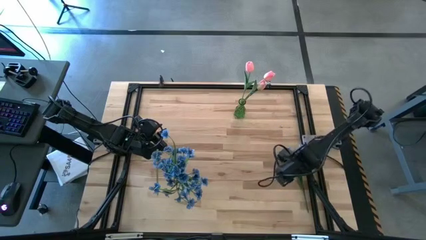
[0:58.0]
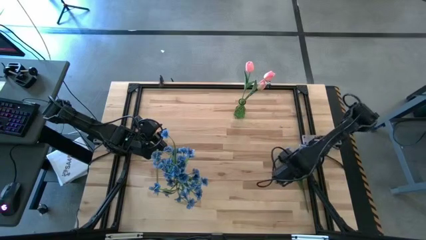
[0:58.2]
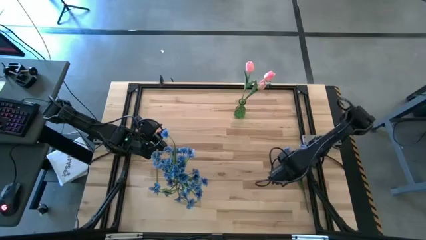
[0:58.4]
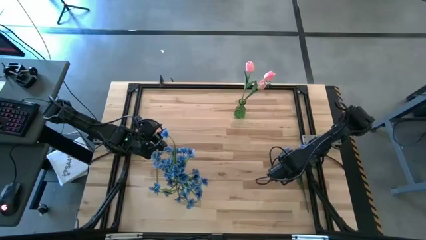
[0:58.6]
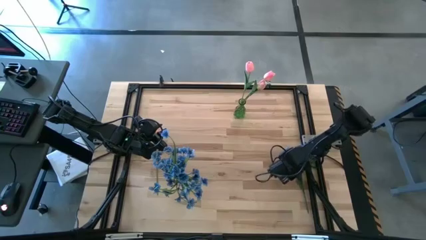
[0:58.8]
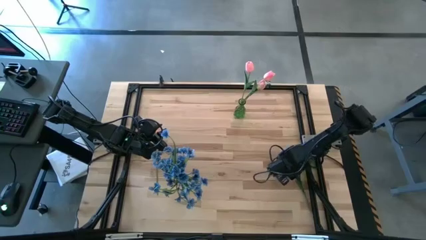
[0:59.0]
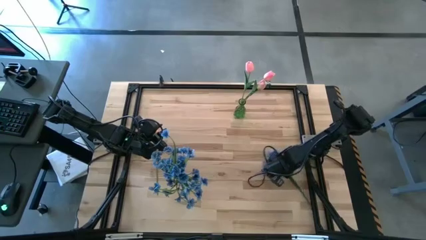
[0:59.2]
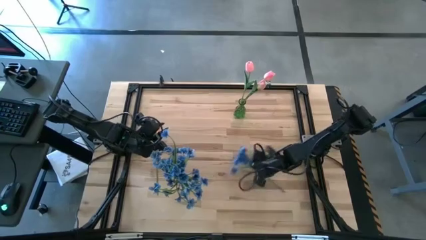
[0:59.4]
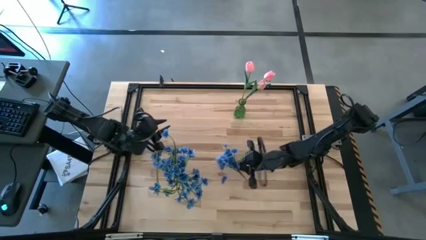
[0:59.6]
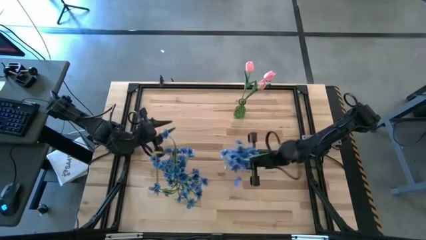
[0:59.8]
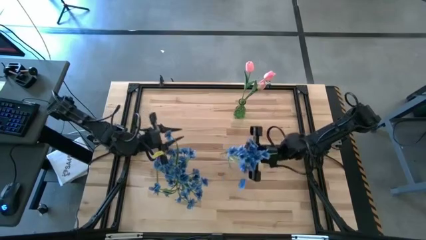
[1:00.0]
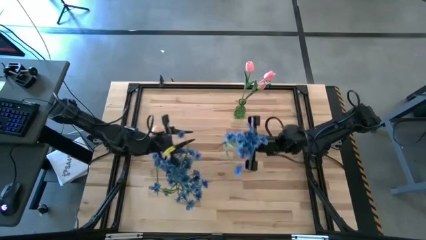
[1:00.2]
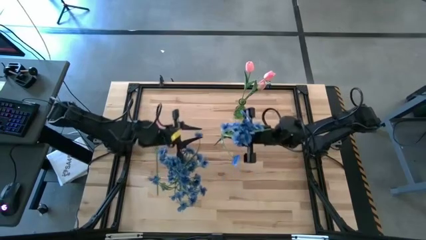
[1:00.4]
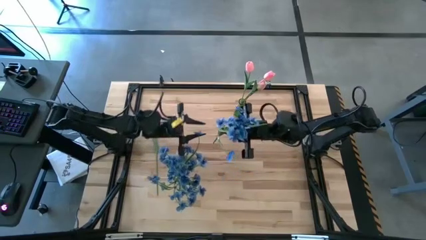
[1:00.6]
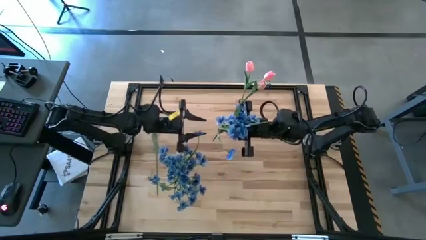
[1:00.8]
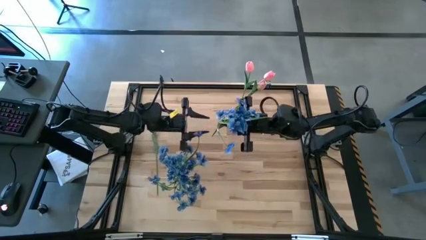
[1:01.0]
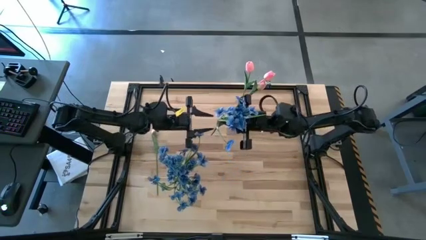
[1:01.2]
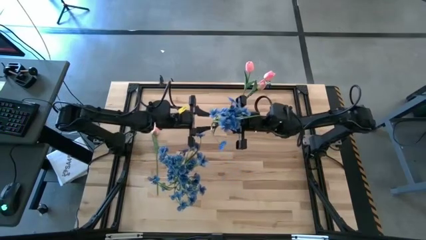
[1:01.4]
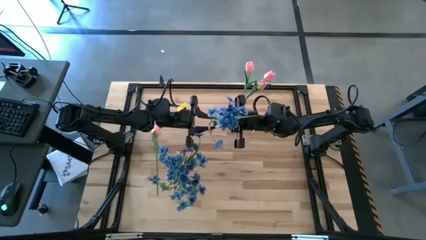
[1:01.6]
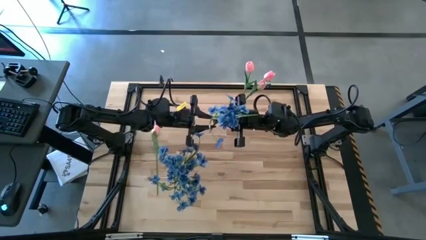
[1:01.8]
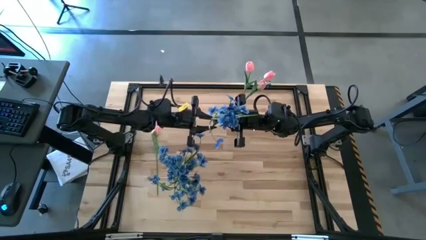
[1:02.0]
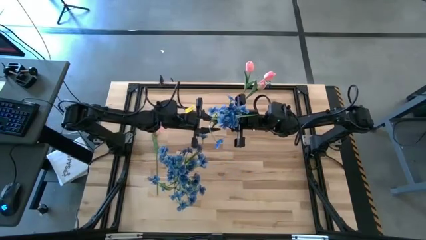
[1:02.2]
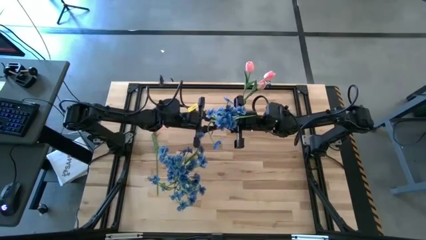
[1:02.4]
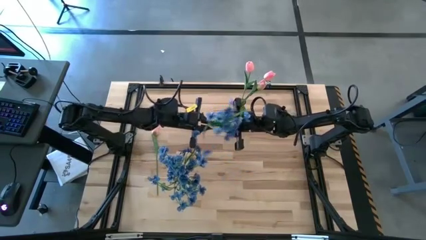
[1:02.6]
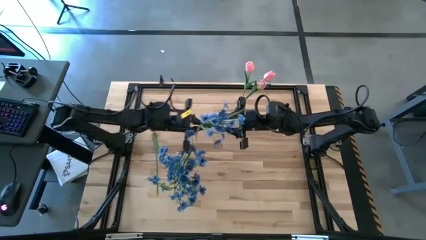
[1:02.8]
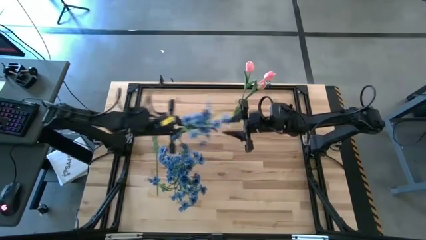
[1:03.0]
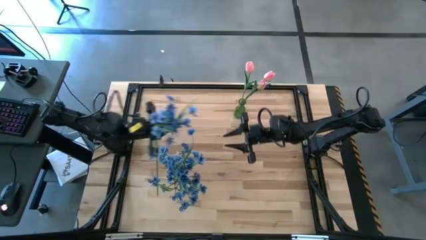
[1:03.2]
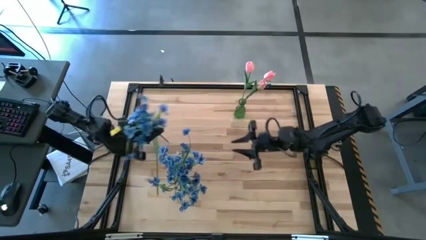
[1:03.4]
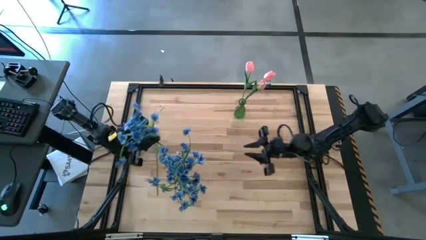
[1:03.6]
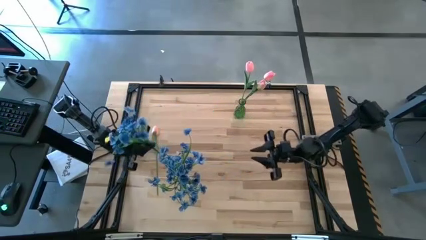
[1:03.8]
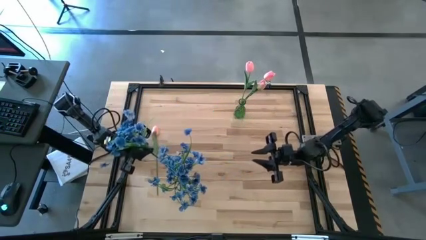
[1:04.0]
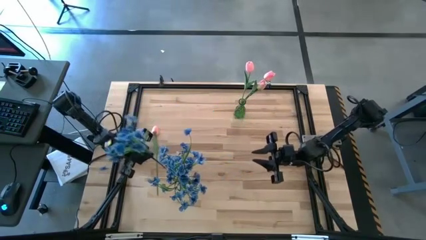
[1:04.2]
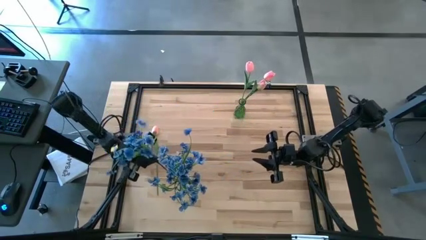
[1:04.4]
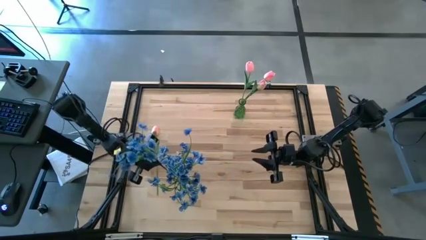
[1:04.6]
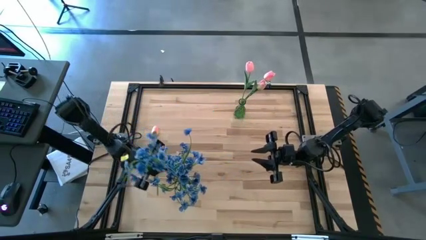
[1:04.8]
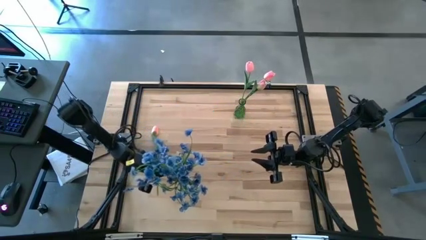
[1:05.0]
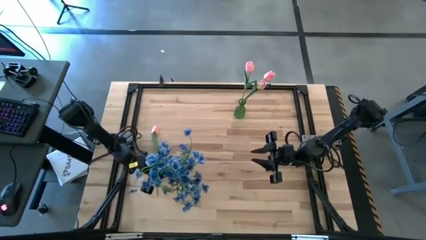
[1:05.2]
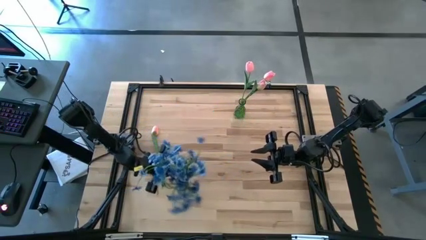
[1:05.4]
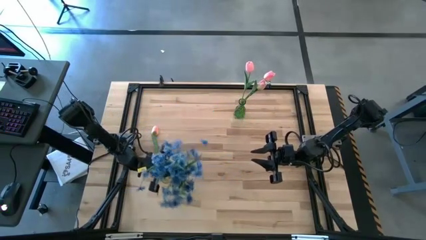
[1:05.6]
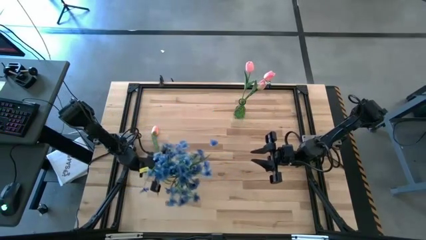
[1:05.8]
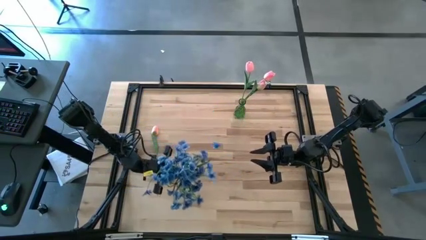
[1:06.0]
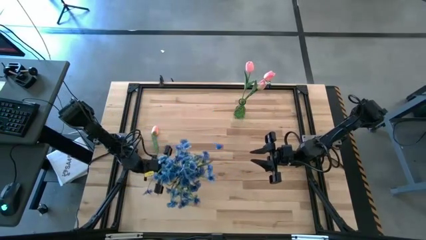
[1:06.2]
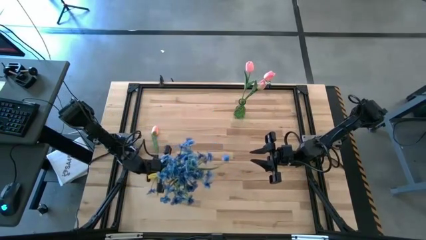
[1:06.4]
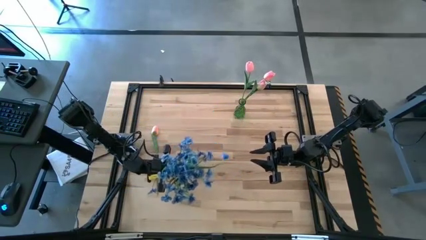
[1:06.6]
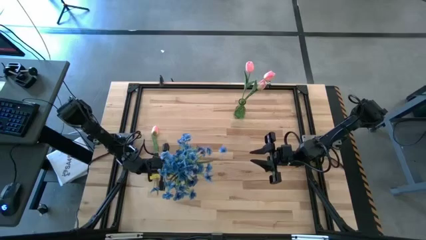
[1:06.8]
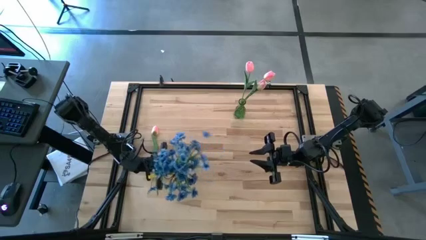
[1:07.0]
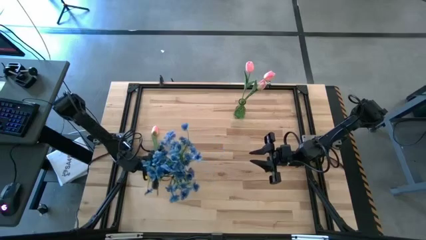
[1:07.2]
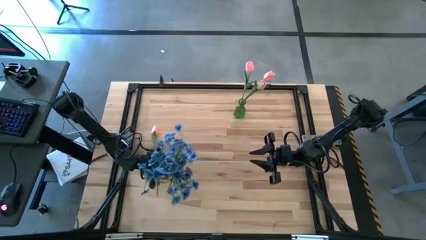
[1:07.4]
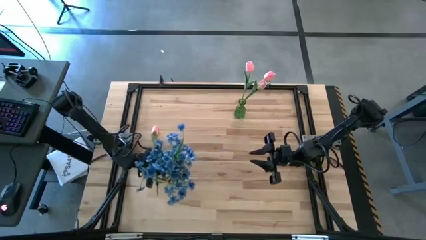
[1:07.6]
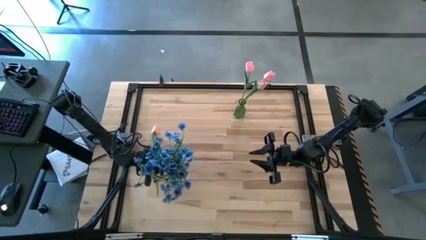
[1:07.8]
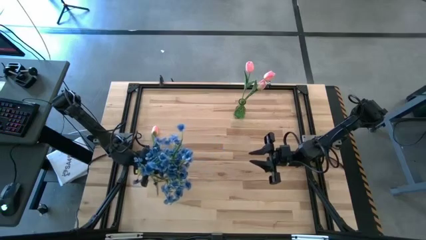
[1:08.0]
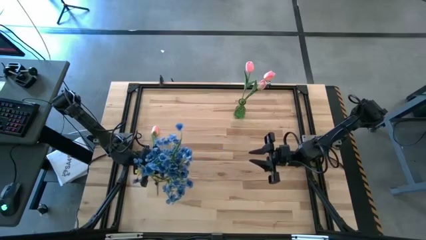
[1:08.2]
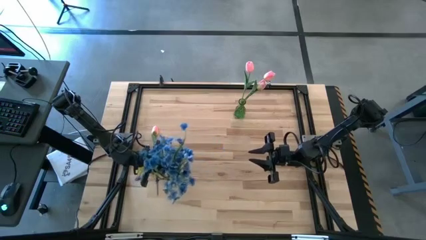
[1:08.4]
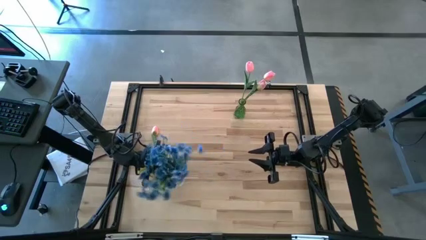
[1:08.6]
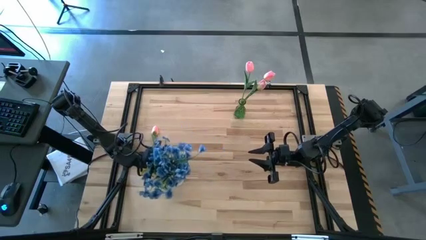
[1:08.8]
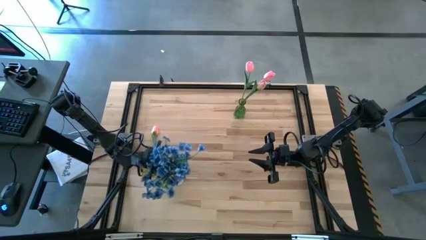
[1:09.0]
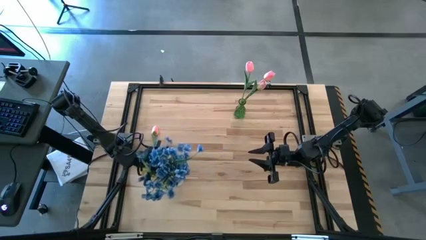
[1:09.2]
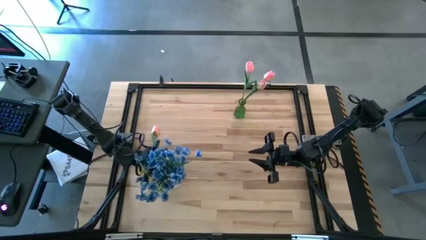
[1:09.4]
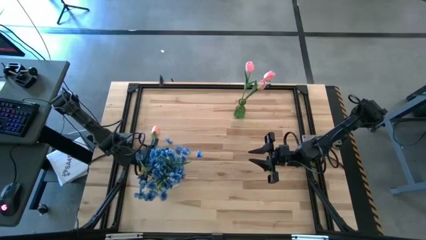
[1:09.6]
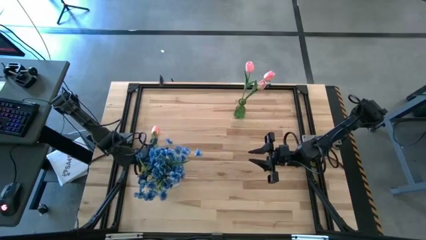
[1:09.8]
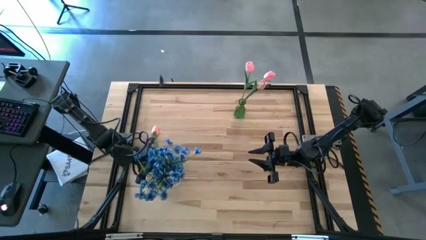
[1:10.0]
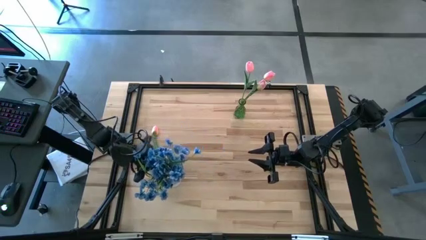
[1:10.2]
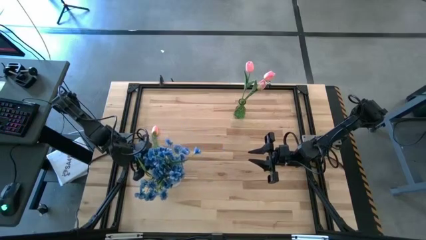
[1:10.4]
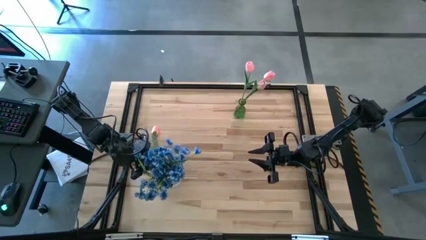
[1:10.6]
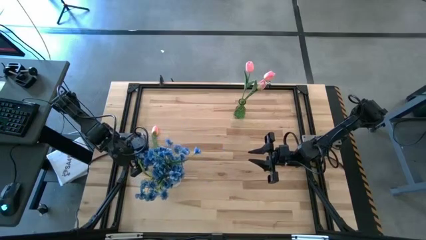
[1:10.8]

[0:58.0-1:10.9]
Task: Sort flowers into vase by color
Put the blue flowers into the transparent vase
